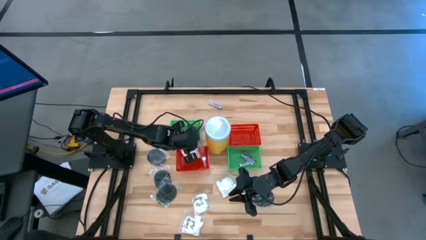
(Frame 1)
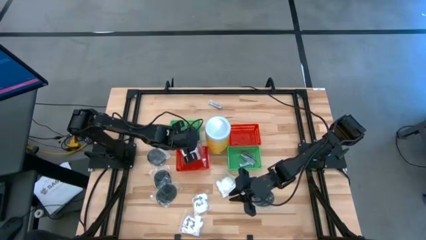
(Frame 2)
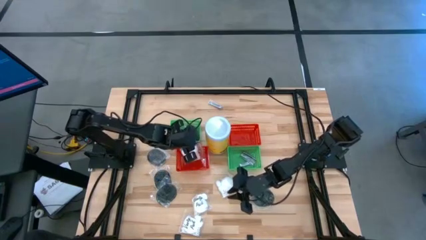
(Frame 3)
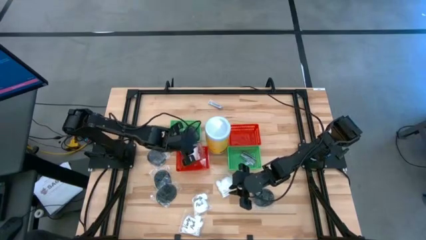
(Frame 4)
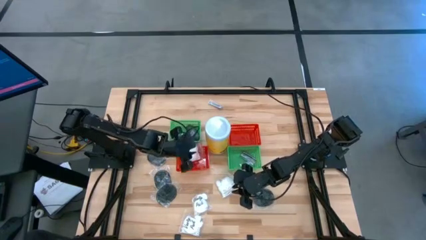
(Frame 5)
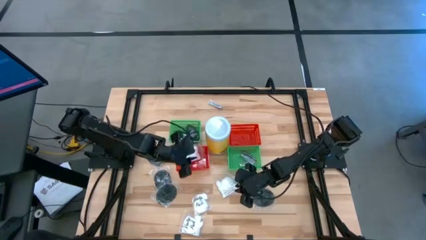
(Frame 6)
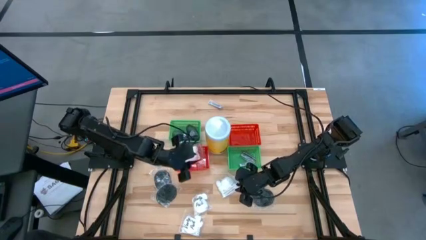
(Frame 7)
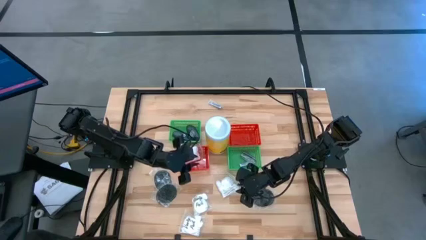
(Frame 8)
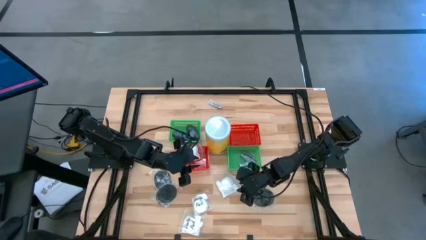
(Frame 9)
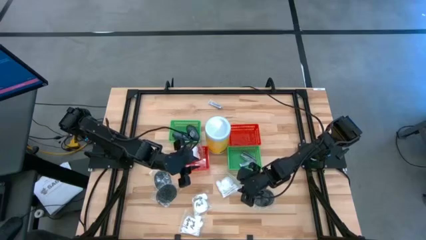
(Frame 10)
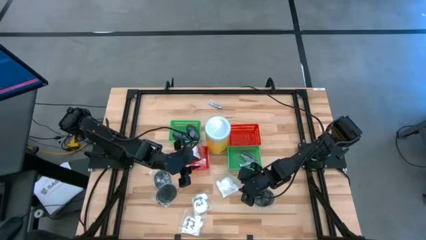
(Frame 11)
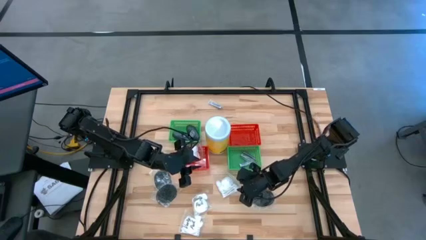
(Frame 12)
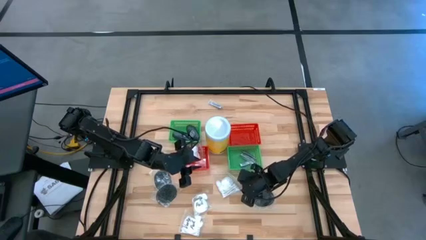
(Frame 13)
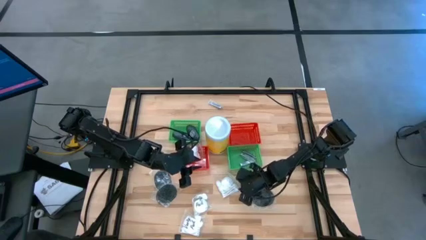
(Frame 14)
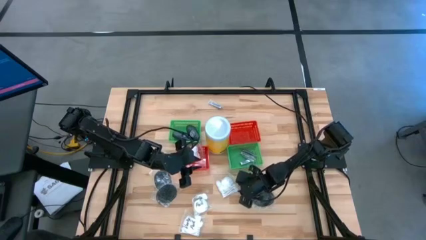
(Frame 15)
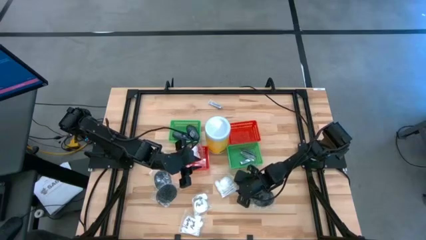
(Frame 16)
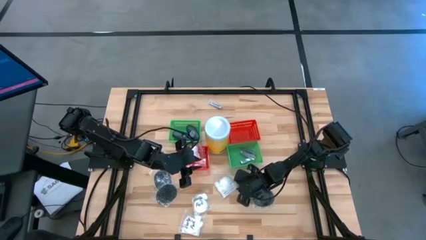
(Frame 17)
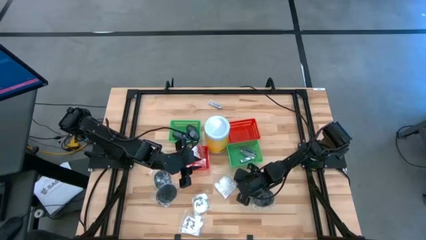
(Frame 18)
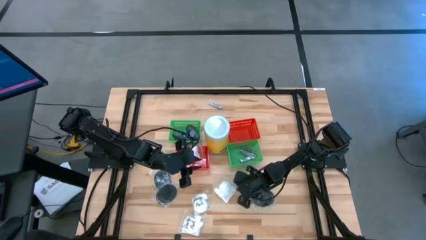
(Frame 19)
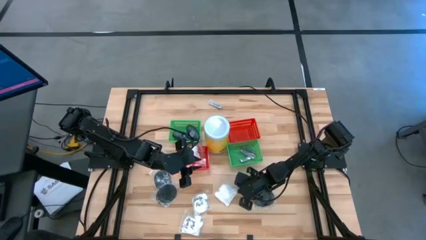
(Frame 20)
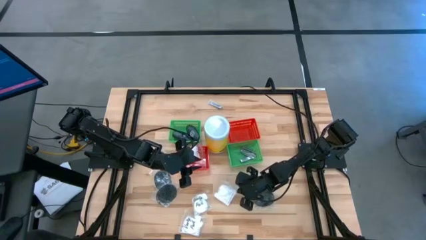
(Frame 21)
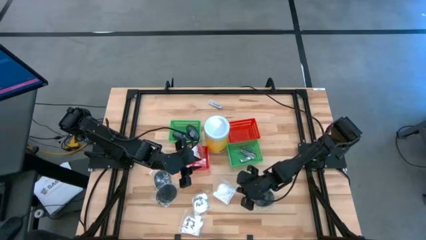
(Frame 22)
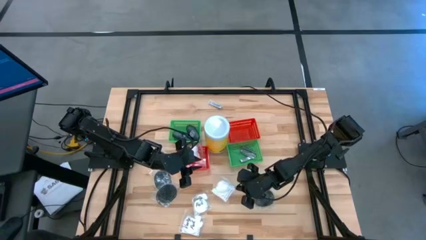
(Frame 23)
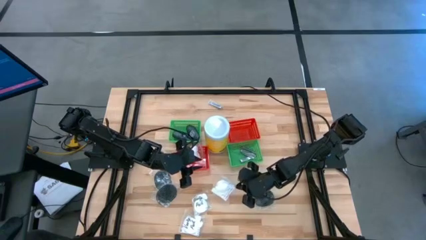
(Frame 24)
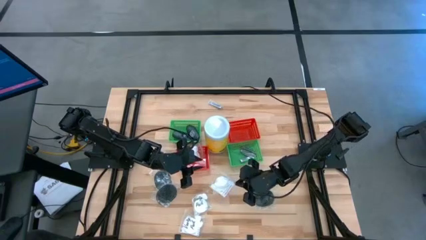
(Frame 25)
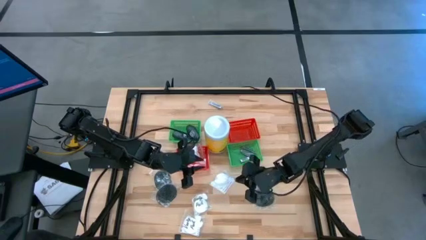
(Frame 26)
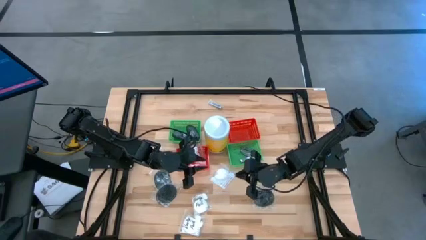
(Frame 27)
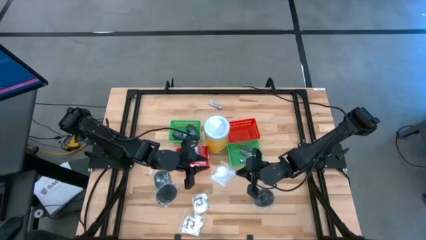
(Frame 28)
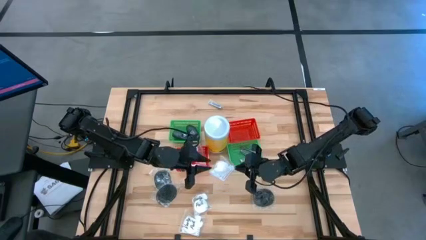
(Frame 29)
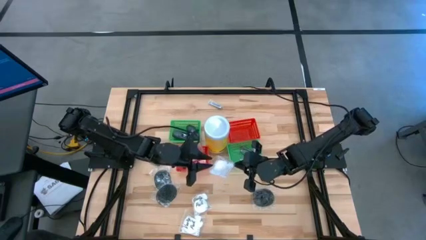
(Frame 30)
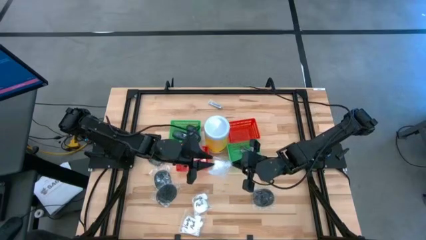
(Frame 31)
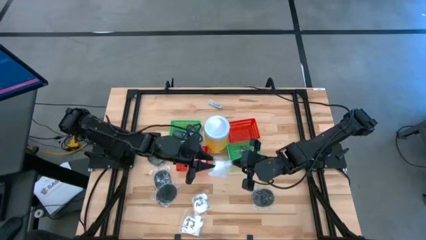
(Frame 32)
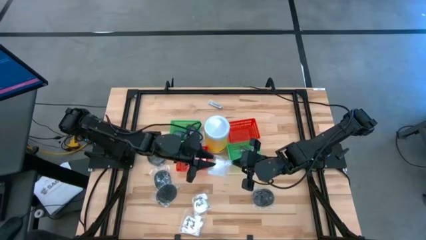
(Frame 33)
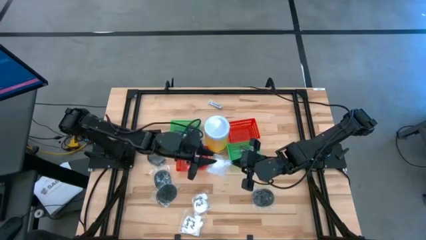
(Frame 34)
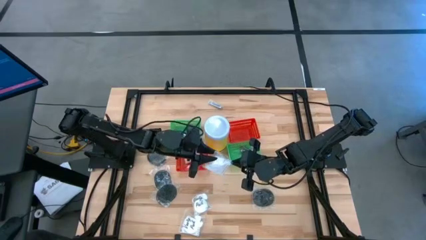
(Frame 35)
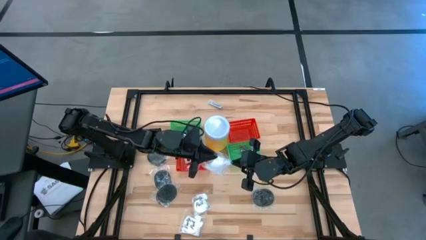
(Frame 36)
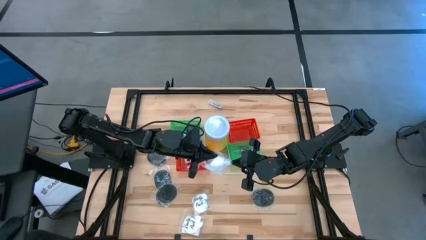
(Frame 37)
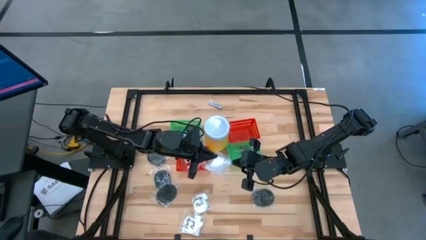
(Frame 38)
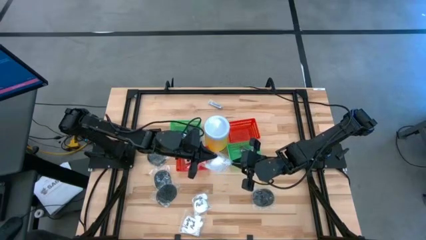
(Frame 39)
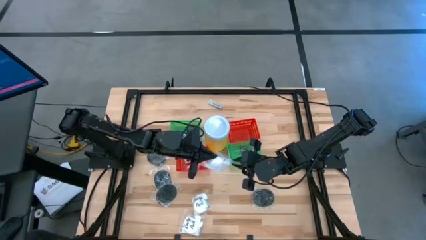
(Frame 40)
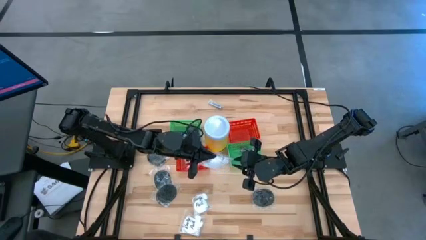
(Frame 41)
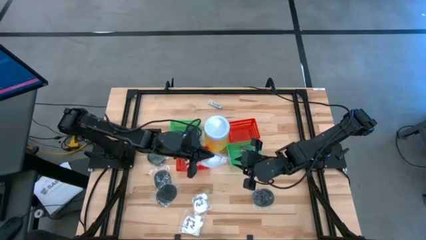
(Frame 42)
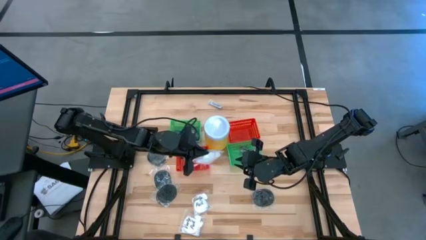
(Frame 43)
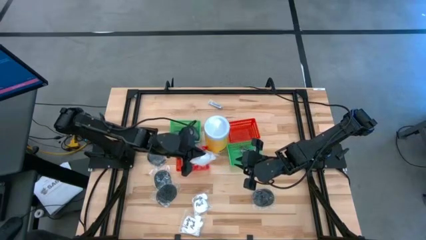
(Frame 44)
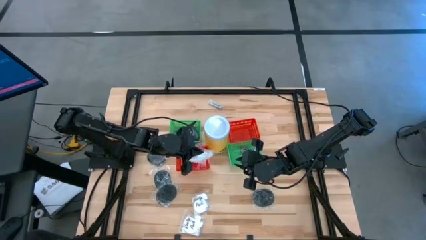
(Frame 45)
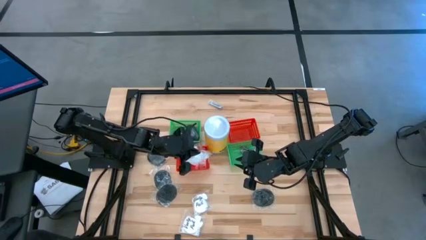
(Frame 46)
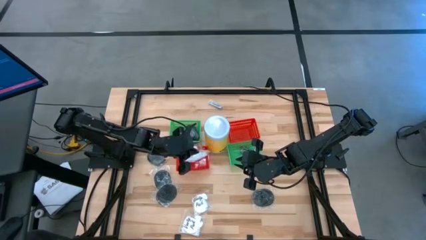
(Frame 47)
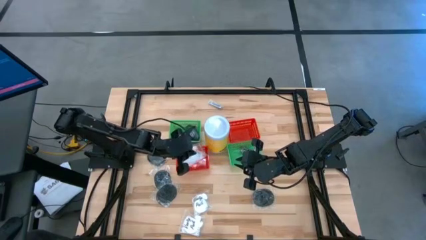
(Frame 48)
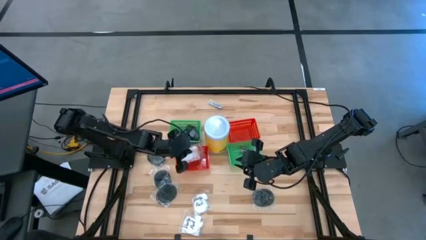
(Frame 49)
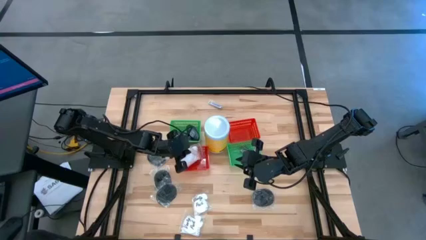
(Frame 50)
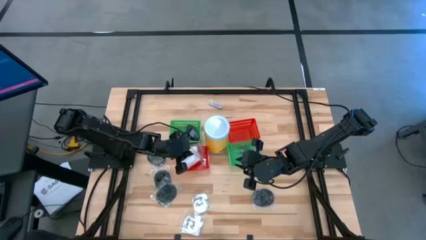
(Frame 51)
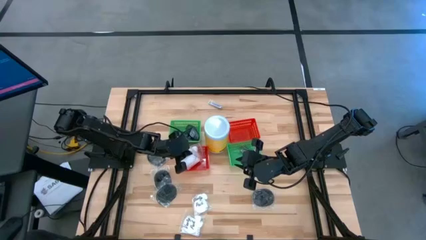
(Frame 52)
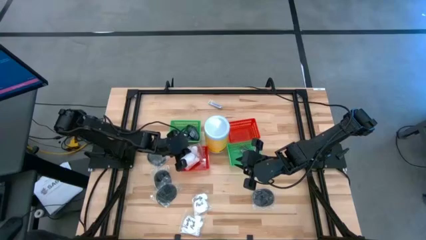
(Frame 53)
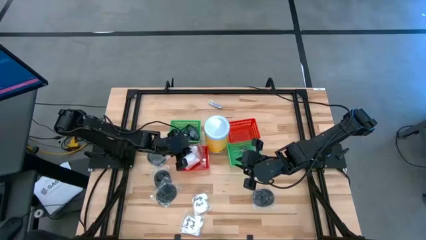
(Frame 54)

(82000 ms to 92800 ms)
Task: Pick & Place Travel size toiletries
Put the transparent cotton pack into the left red bin
